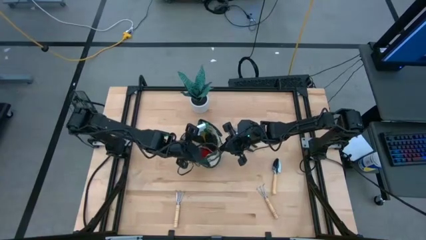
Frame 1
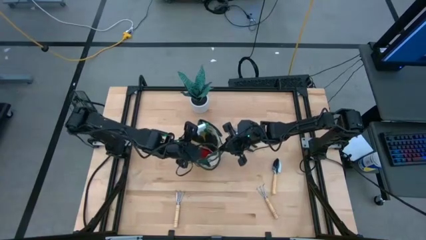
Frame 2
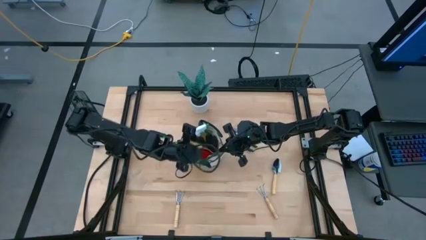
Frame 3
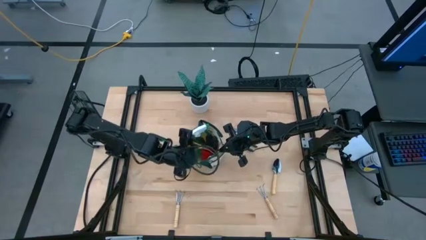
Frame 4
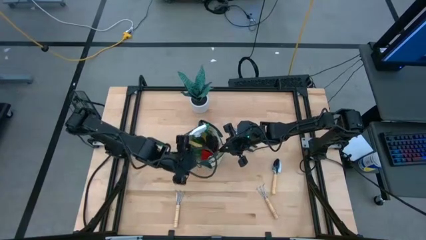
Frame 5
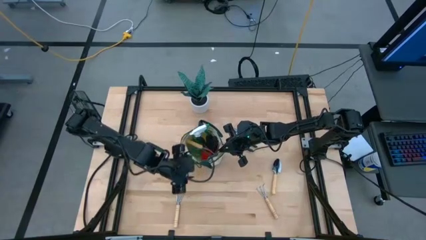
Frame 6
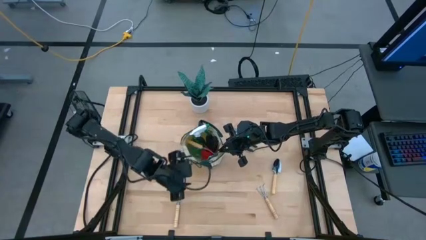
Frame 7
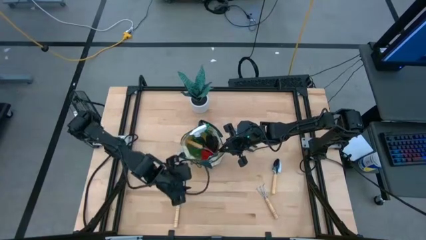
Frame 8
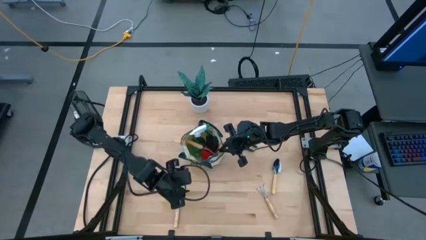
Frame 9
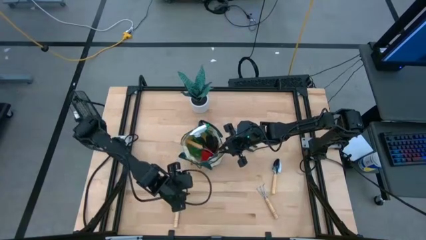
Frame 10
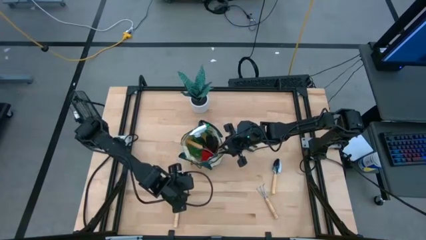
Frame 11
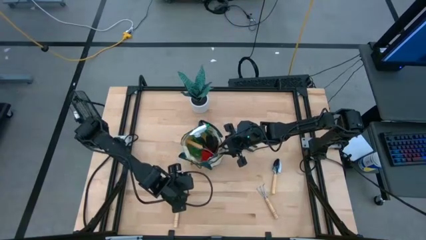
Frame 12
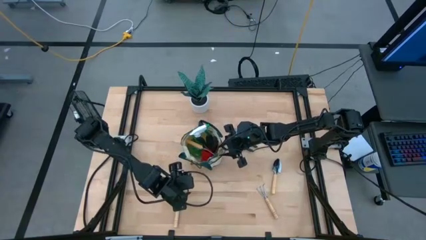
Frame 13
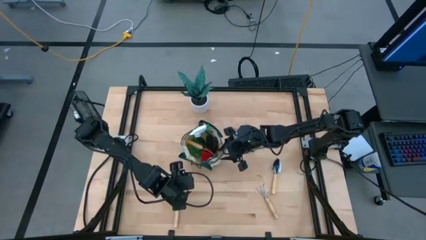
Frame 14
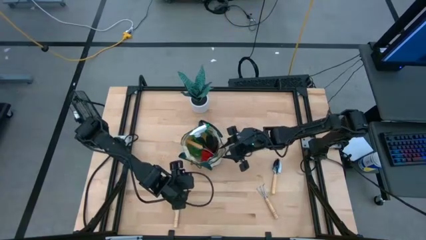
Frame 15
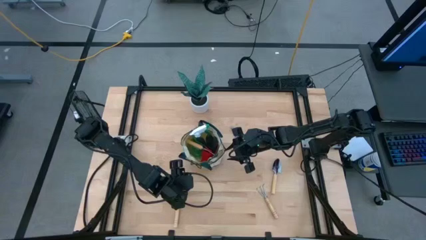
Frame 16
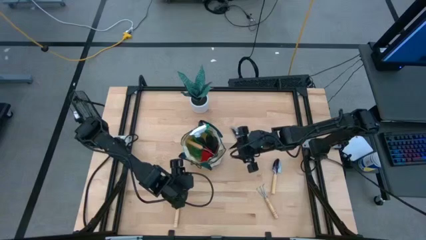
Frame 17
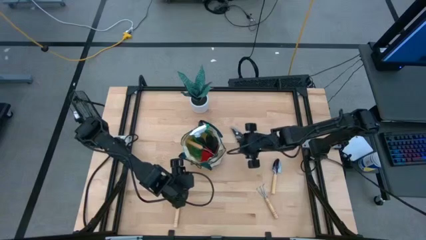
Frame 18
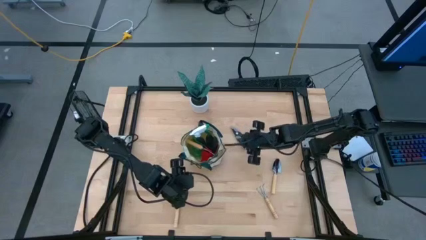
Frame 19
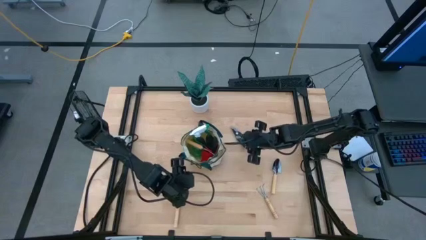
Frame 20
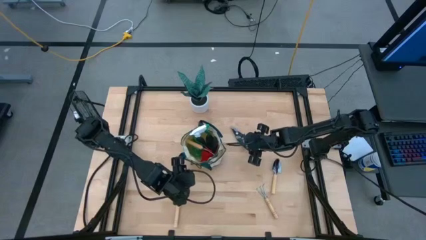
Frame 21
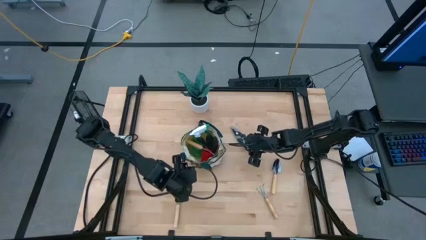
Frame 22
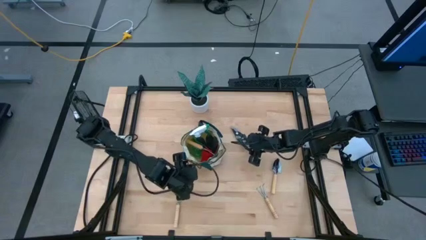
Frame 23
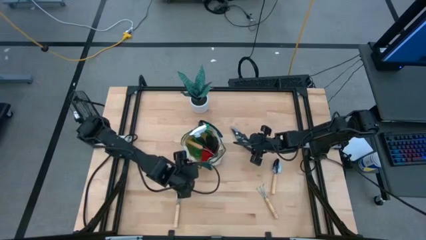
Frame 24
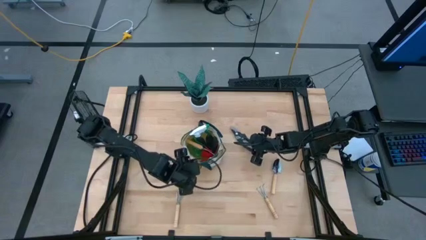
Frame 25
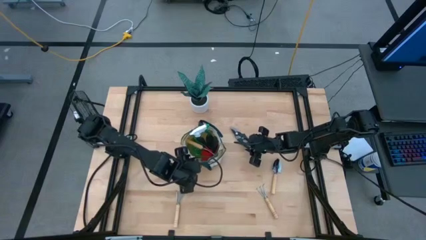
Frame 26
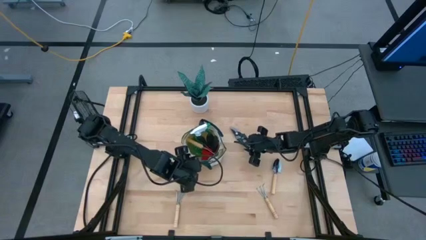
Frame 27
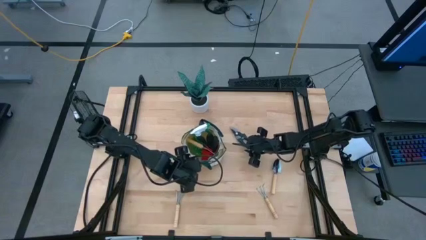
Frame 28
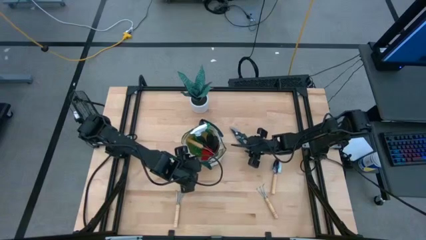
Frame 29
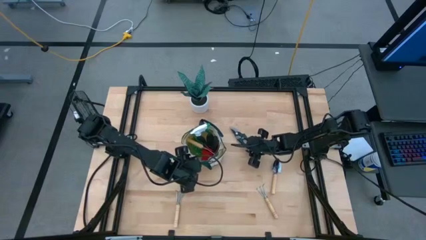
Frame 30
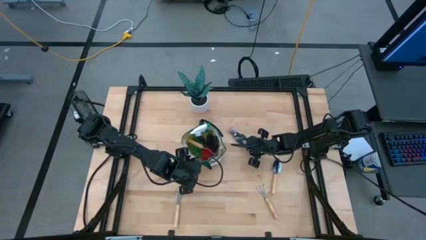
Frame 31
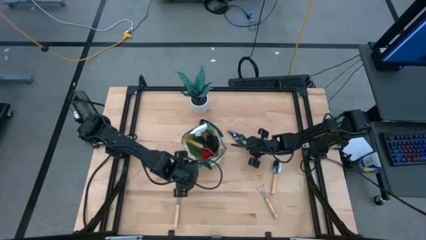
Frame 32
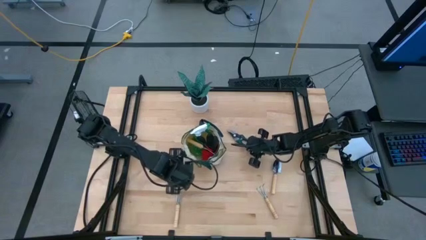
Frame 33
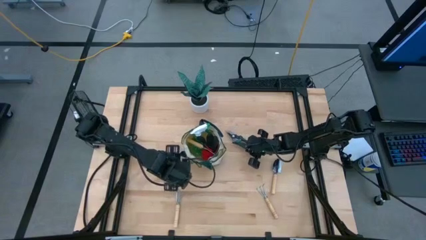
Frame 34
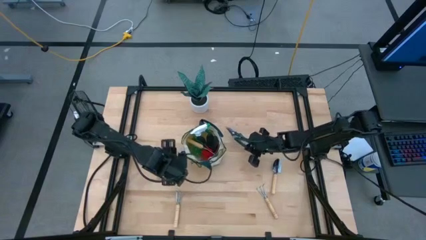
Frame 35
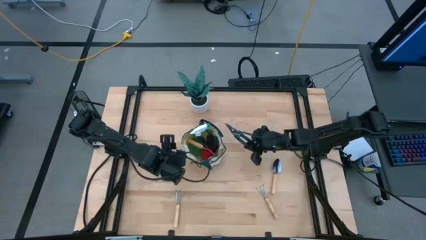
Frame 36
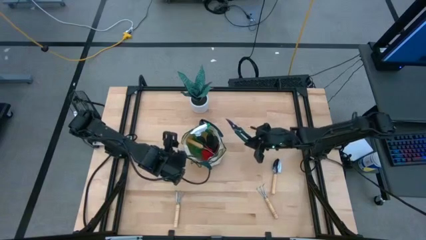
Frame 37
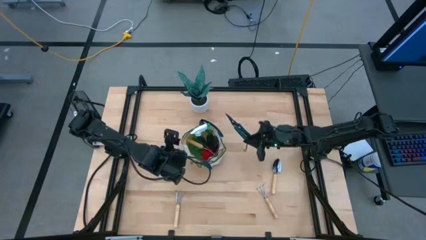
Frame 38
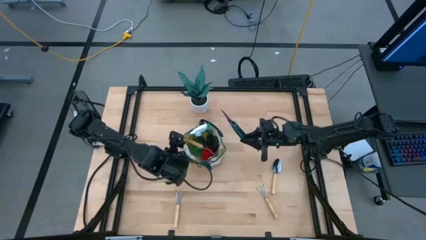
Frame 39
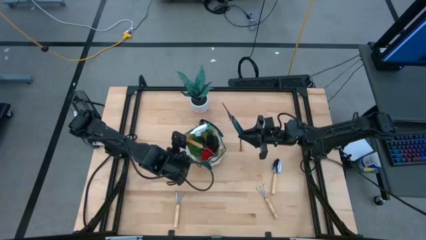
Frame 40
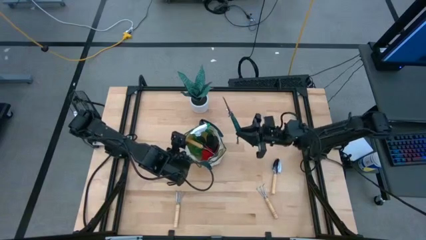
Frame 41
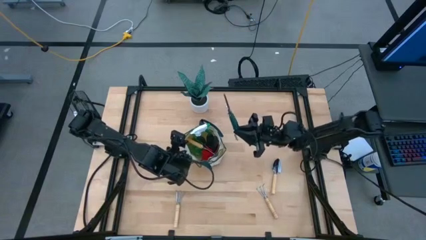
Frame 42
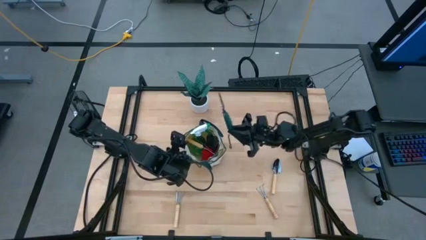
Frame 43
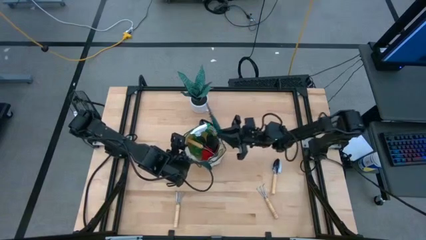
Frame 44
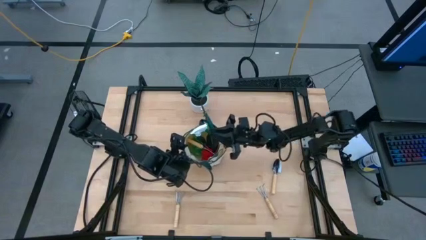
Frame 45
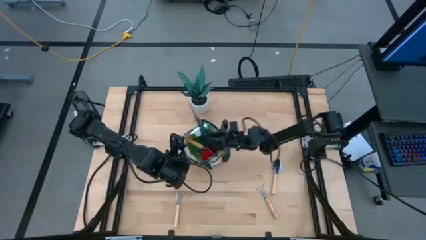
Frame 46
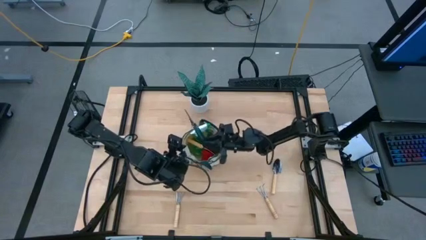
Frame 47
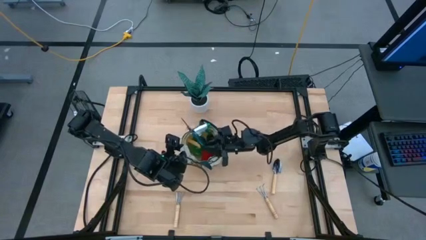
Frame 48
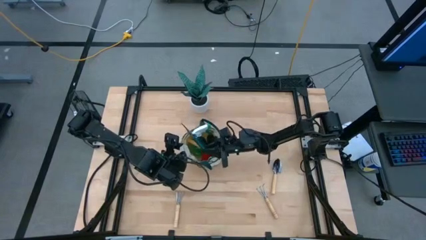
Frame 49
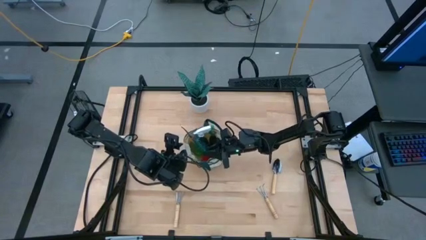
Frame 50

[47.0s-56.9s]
Task: Pick & Place Garden tools in Gardening bag
Put the green shear scissors into the gardening bag

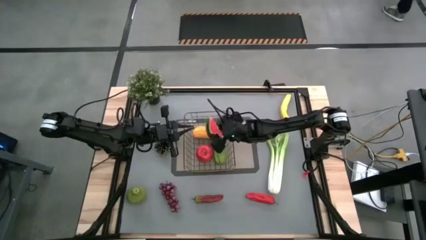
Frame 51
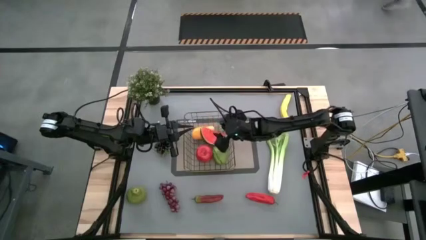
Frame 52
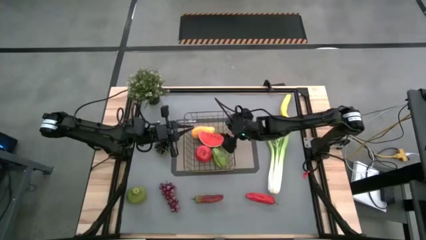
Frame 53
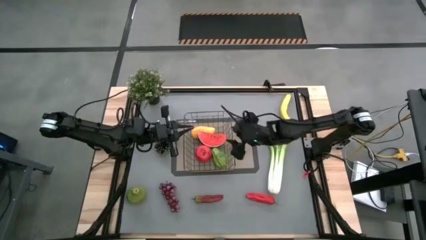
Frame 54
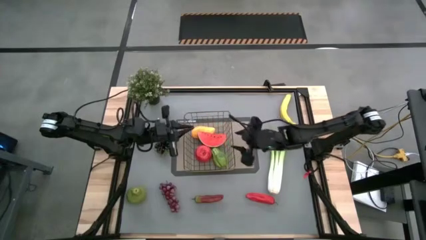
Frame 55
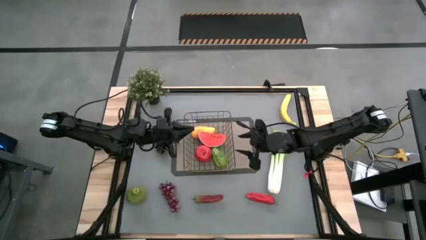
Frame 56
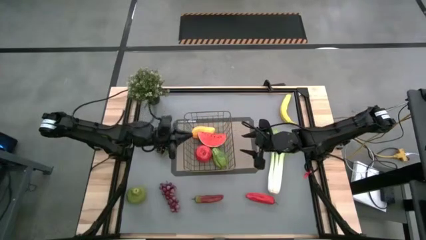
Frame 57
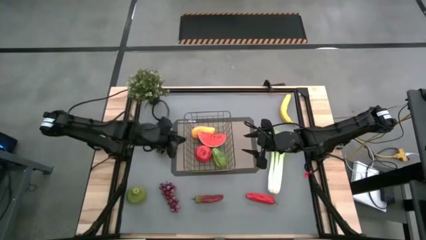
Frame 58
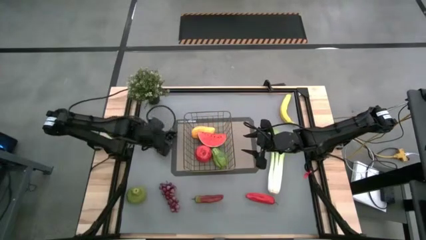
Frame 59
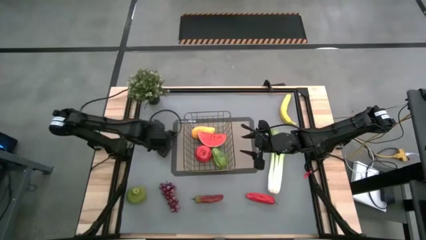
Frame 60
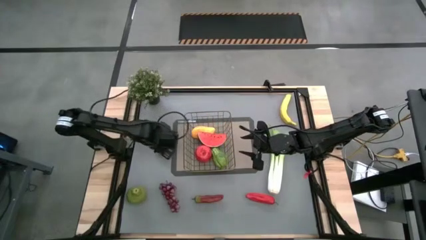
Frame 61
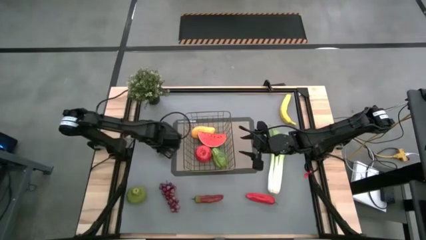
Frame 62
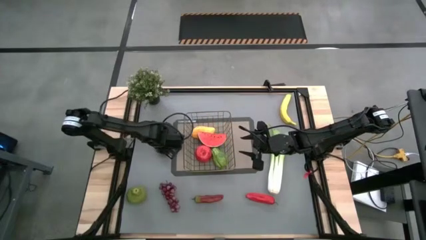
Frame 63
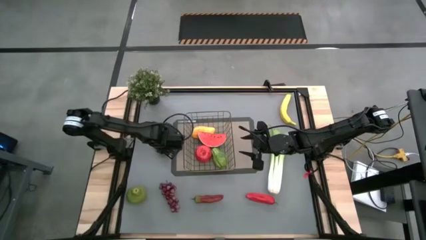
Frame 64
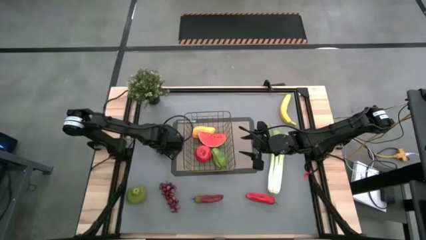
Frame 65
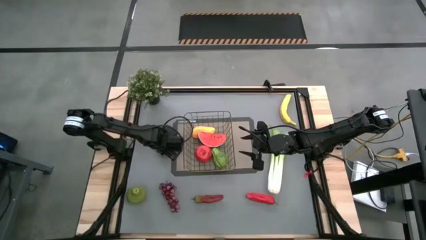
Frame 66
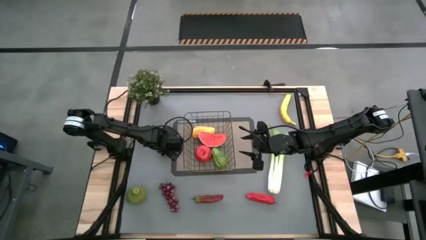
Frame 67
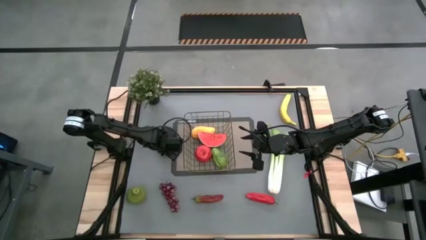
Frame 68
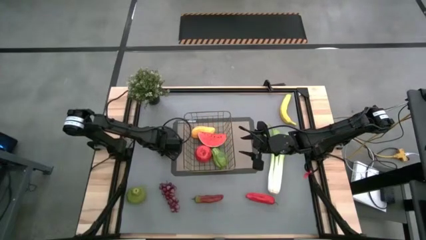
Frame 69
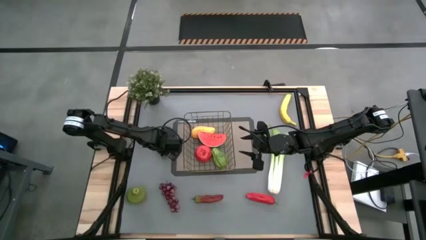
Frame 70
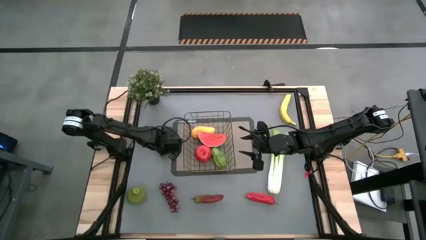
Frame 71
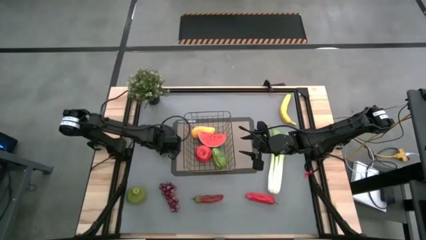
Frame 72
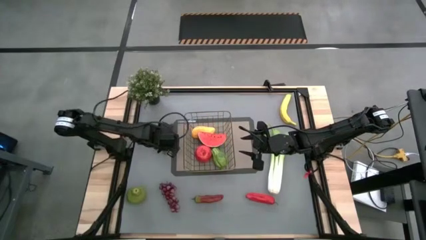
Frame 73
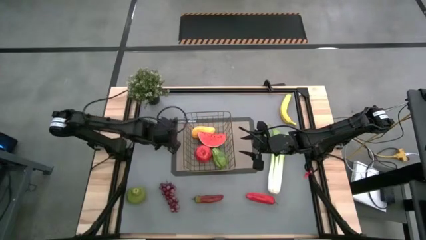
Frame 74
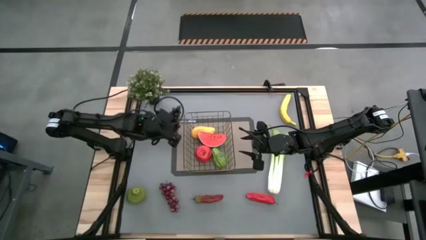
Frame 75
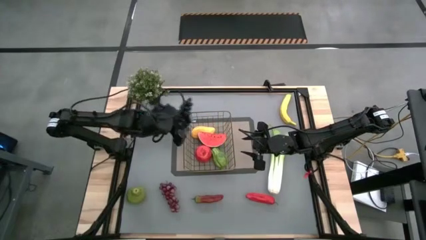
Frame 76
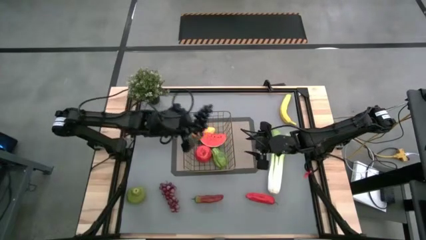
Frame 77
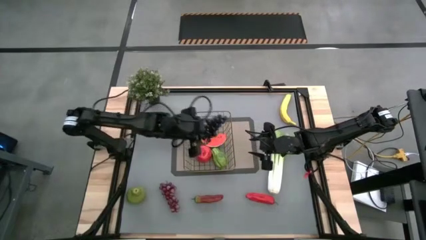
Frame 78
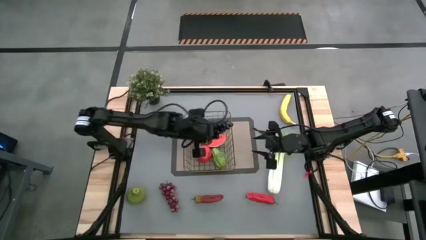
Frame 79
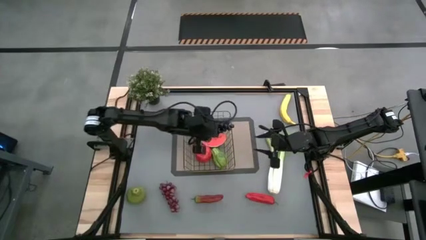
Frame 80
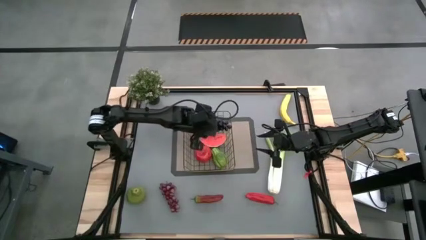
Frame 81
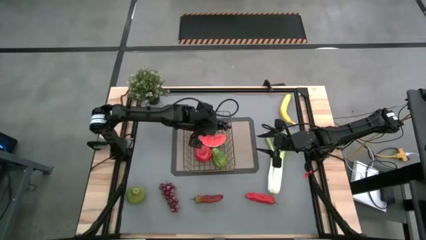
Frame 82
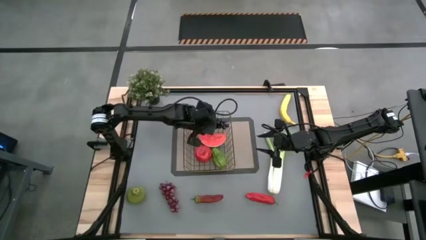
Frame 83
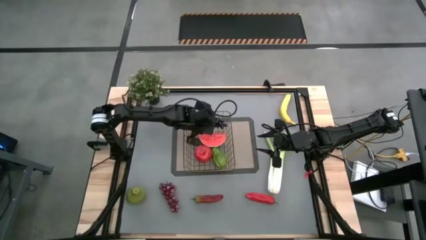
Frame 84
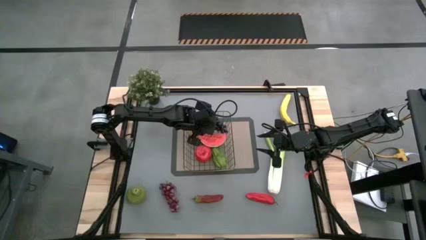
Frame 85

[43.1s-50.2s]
Task: Build produce basket
Put the black grapes into the wire basket
